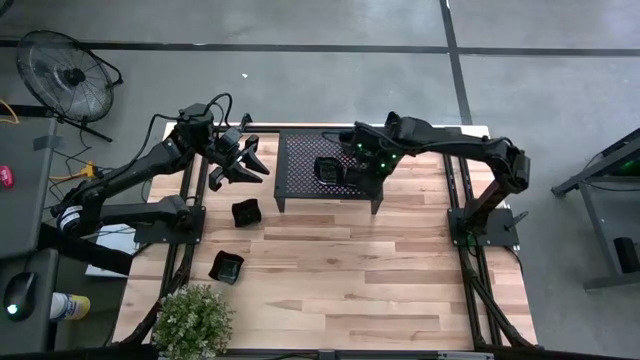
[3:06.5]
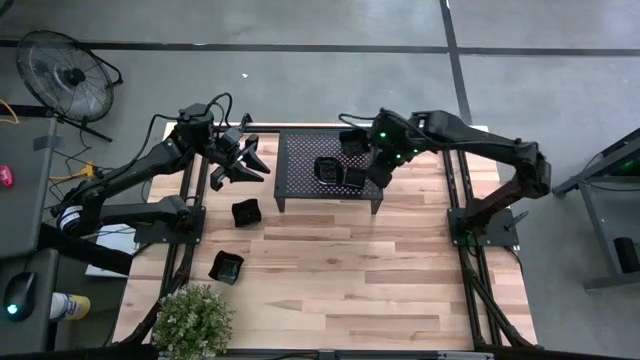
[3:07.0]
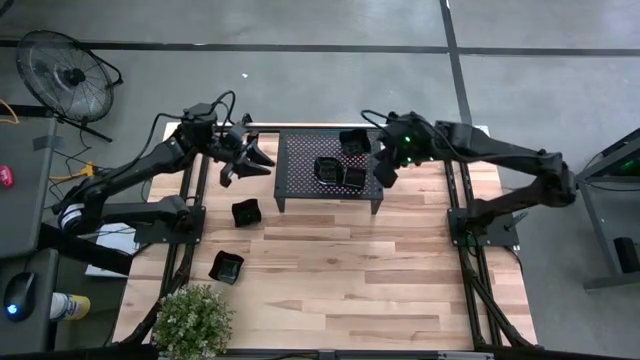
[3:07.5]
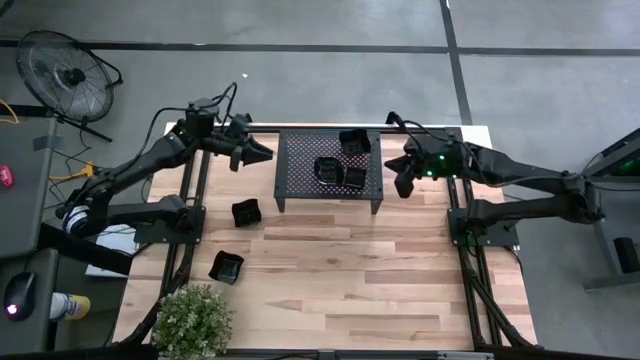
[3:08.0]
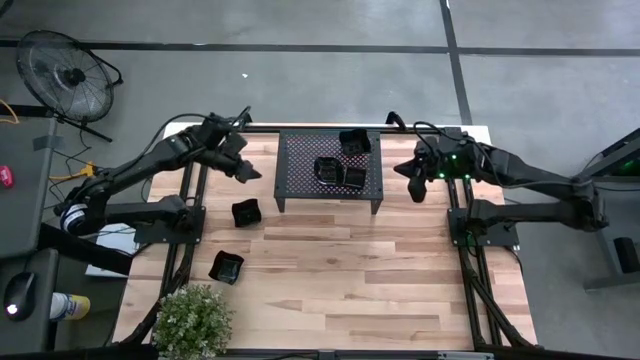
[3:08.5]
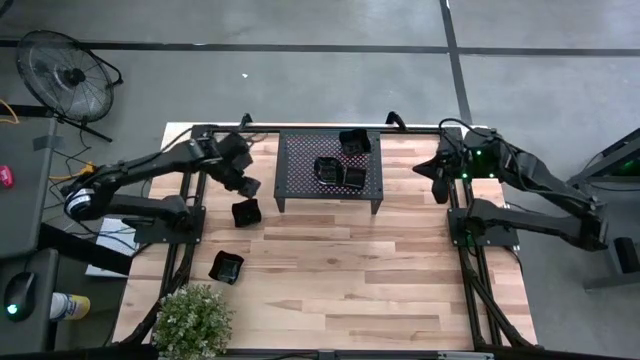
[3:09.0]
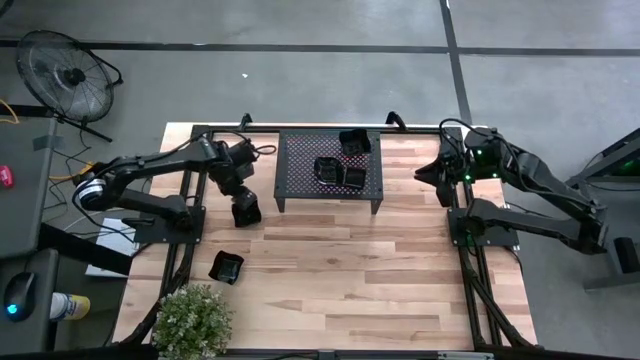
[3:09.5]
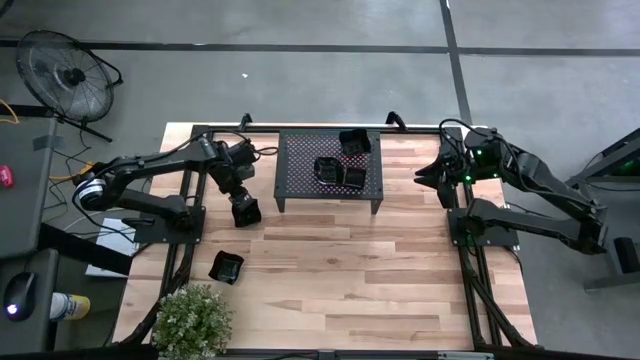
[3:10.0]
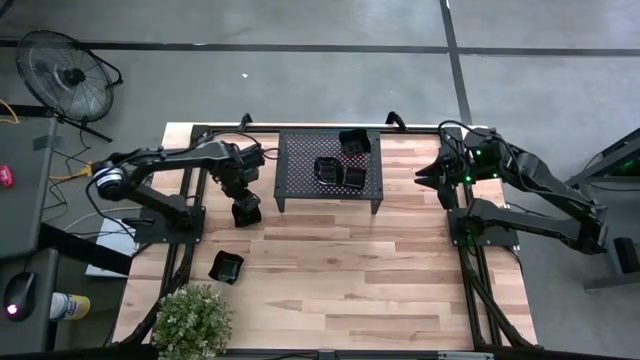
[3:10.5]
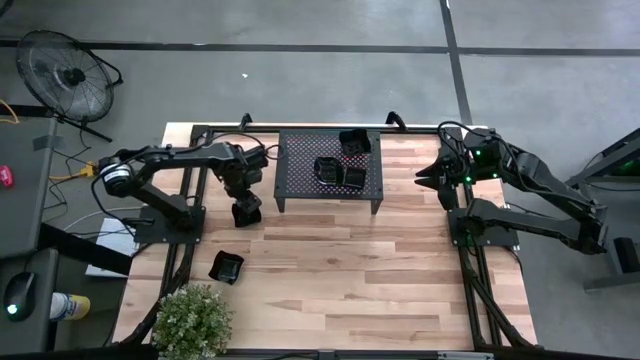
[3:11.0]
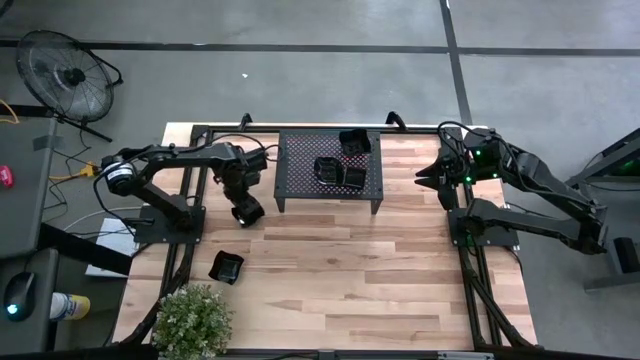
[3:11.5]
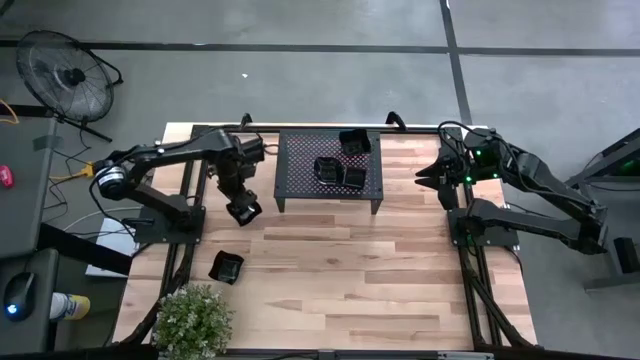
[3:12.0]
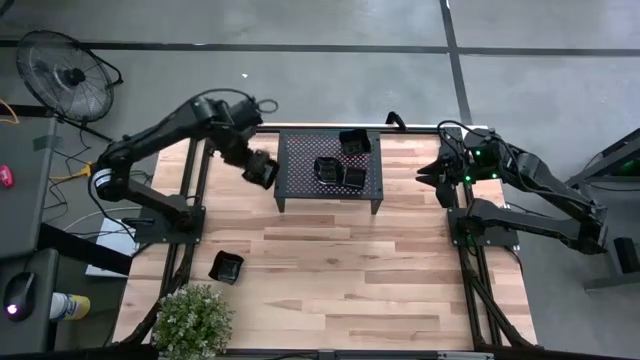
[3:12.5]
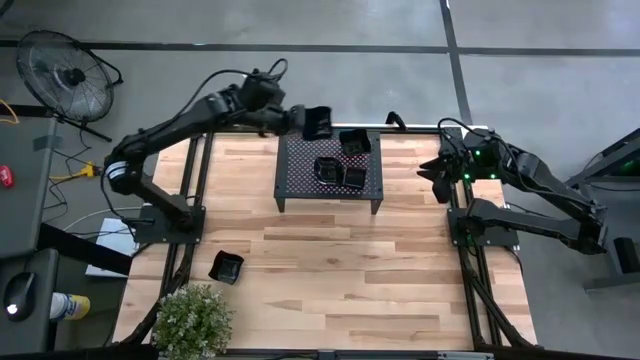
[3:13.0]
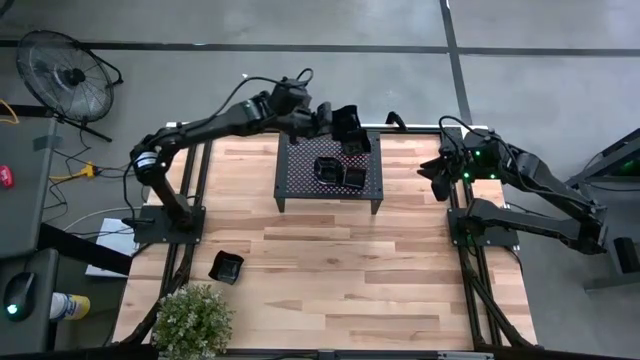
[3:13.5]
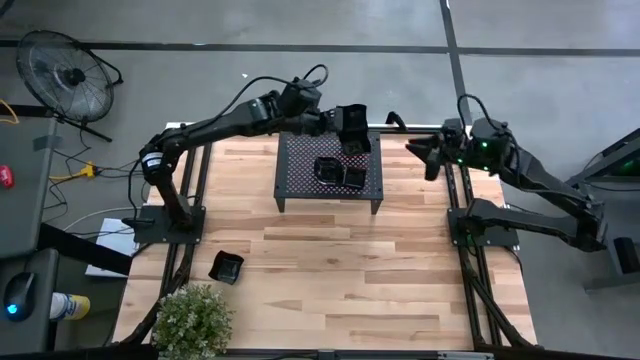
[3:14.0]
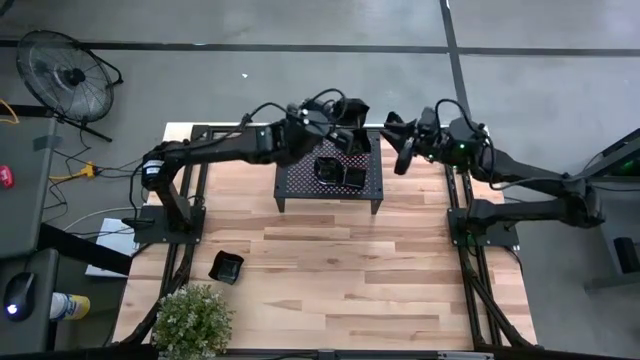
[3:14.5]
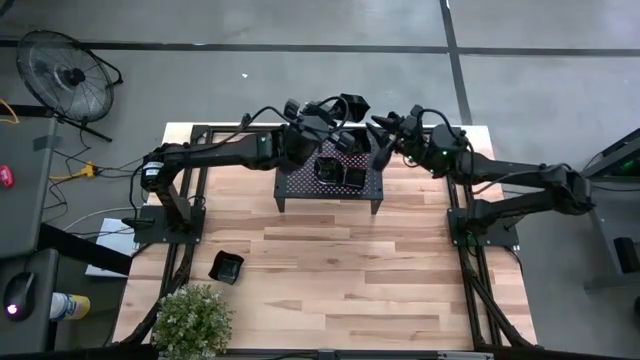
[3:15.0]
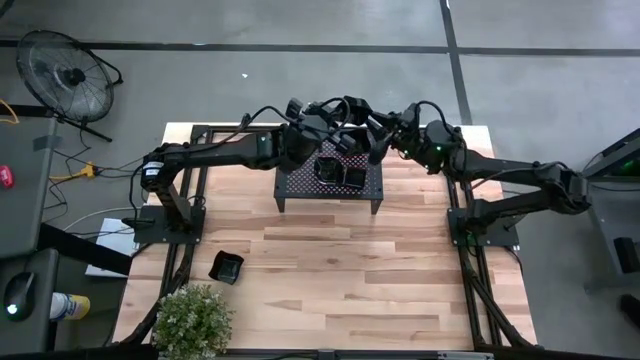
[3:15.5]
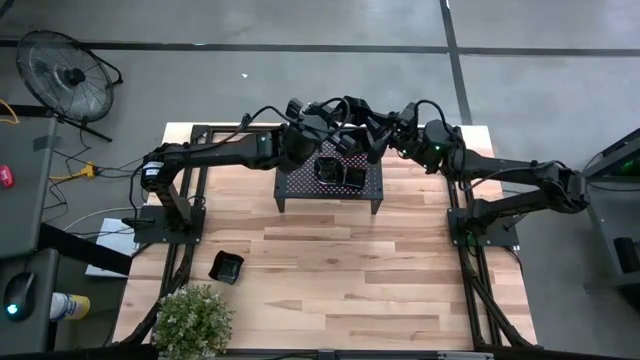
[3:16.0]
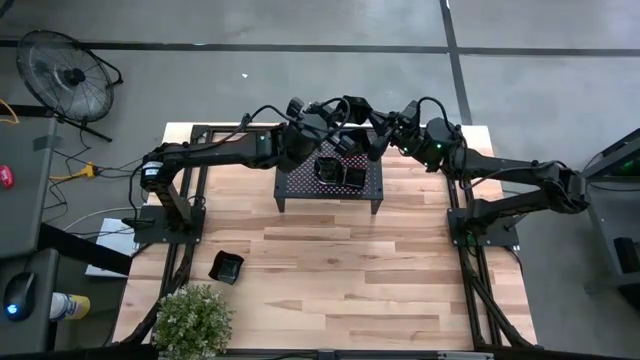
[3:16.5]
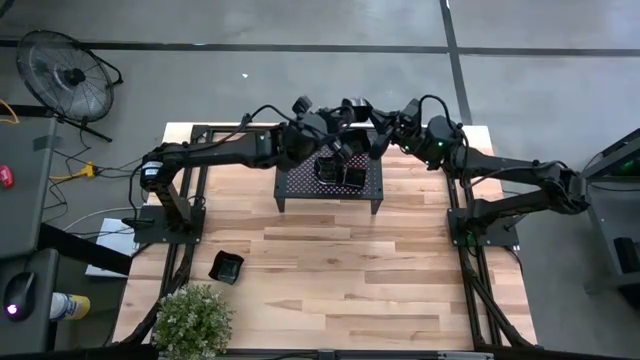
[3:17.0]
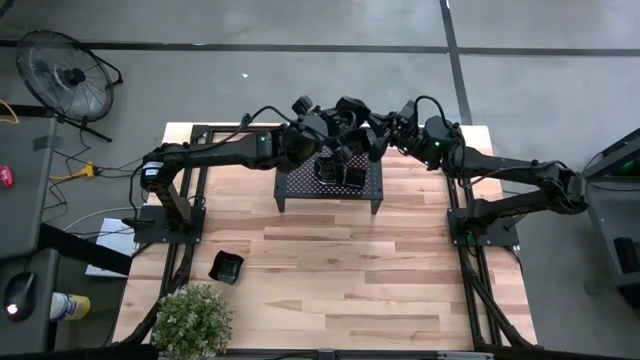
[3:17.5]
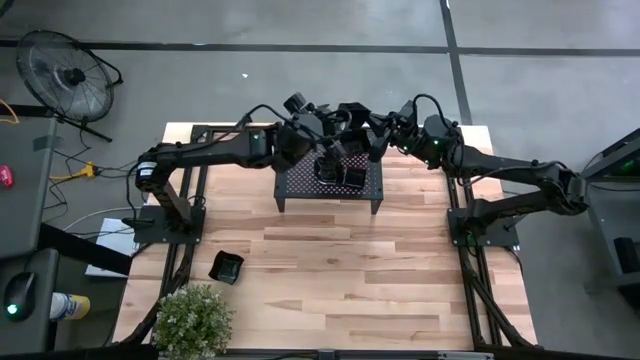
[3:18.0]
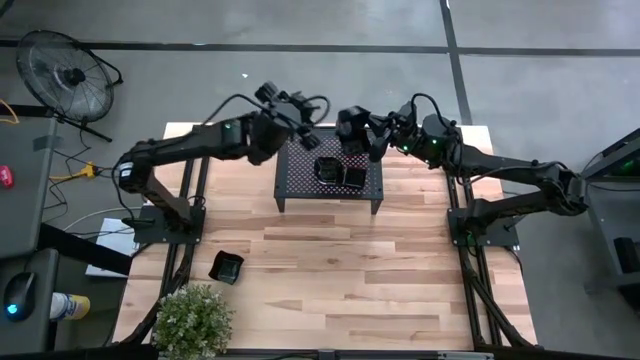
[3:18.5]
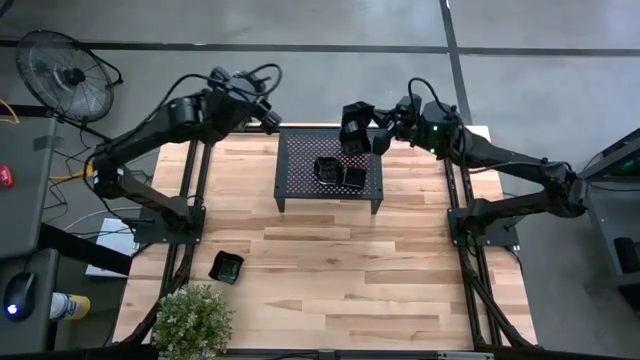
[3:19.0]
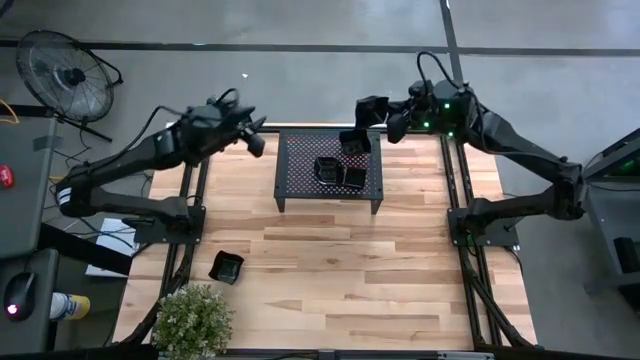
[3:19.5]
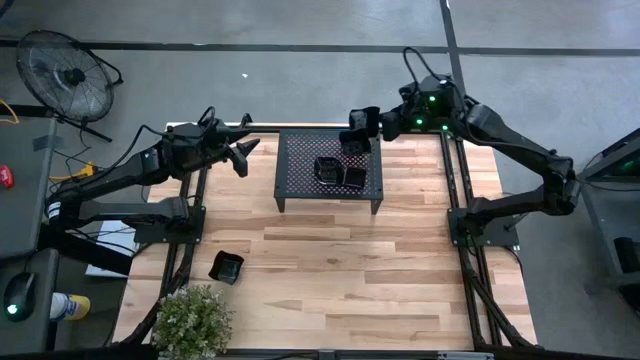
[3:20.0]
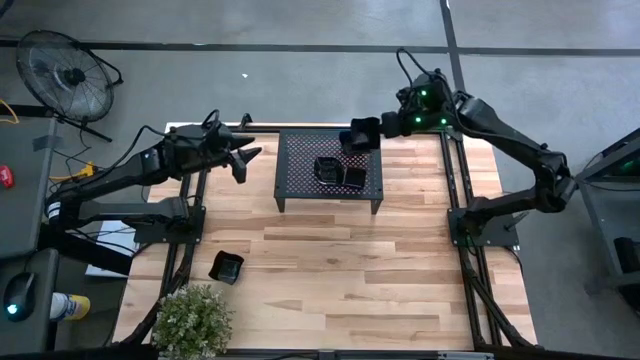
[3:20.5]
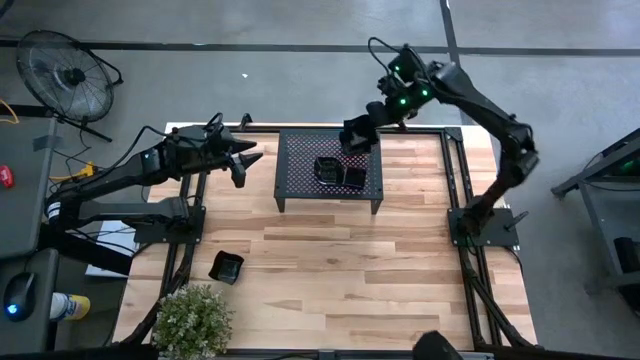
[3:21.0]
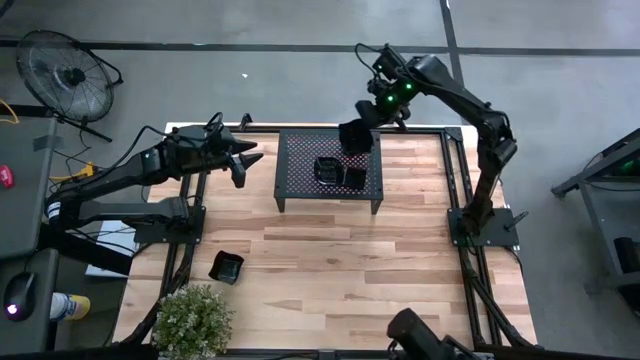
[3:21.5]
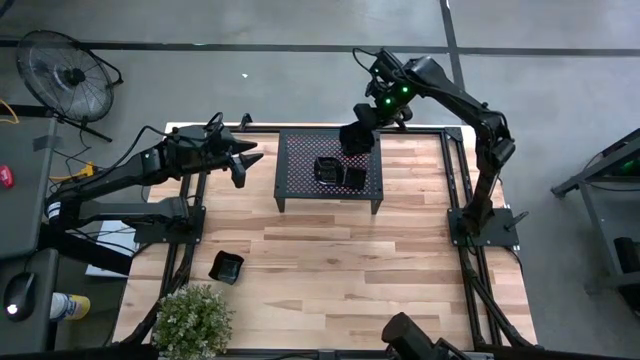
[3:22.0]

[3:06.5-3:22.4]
Task: Pick & Place Mini shaped plates
Stack the black distorted square plate on top of the other black distorted square plates on the shelf

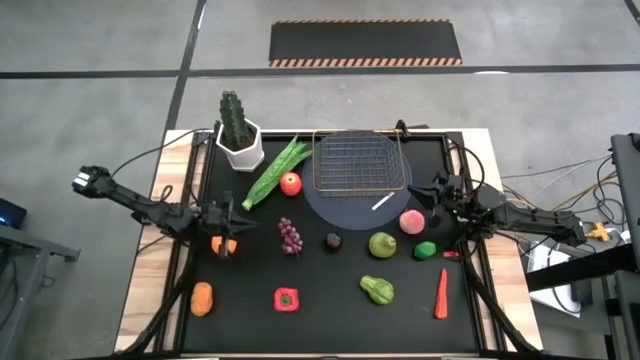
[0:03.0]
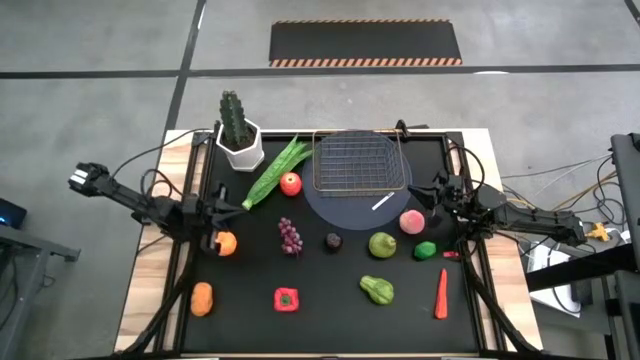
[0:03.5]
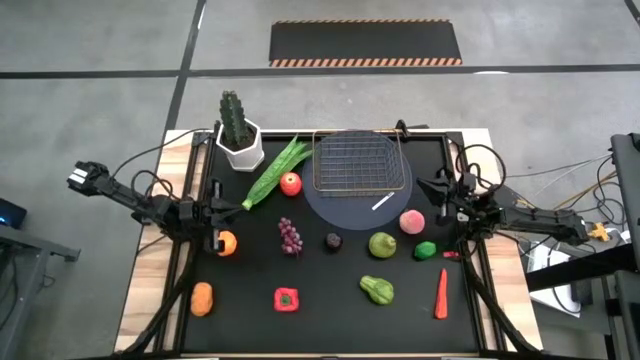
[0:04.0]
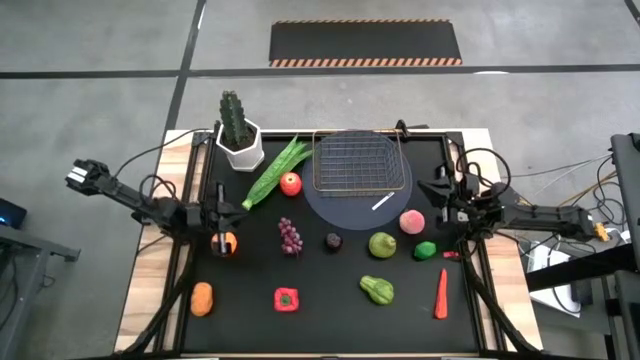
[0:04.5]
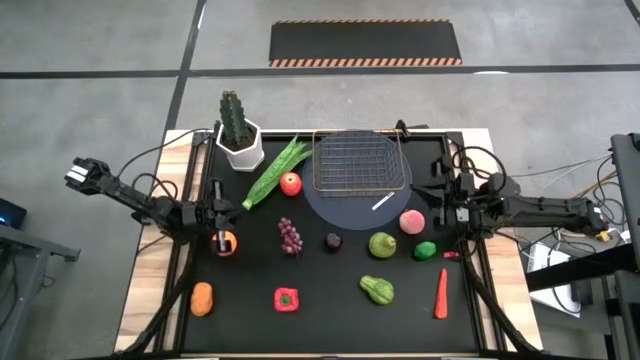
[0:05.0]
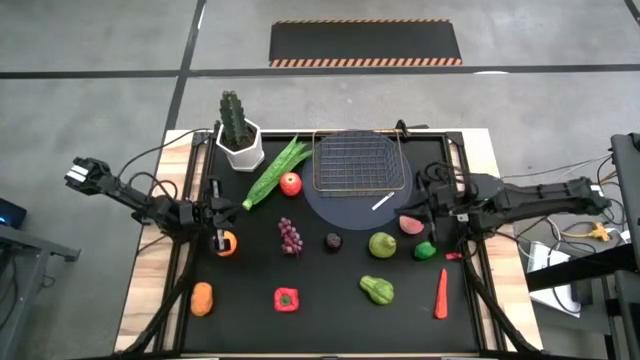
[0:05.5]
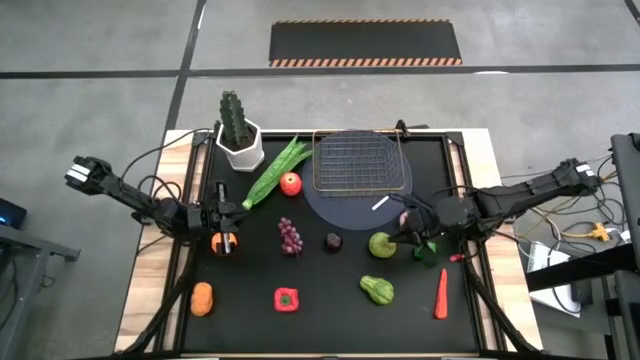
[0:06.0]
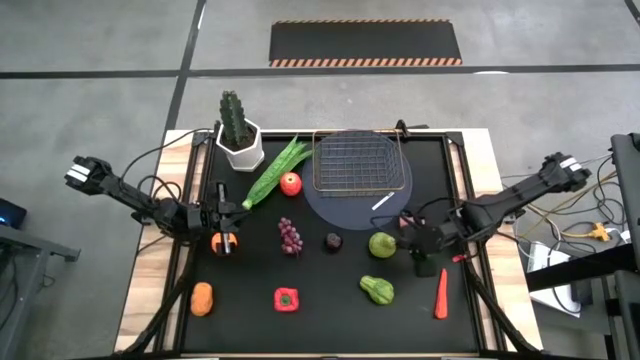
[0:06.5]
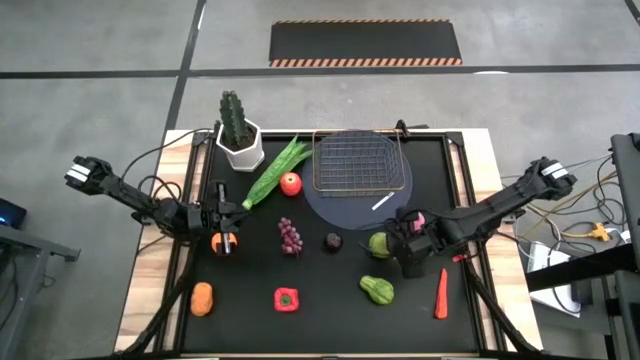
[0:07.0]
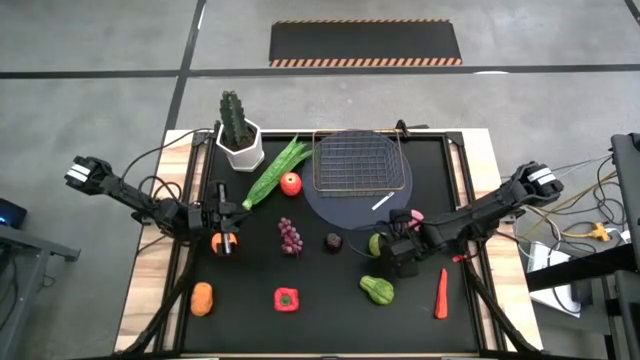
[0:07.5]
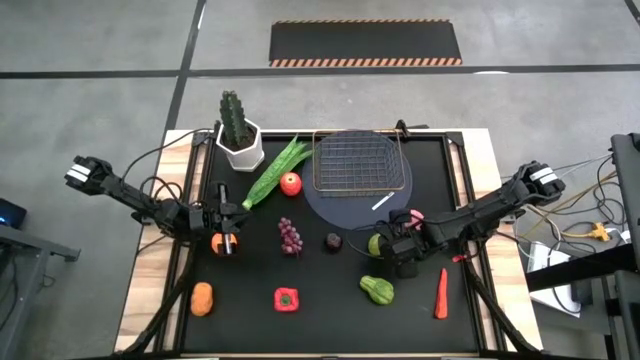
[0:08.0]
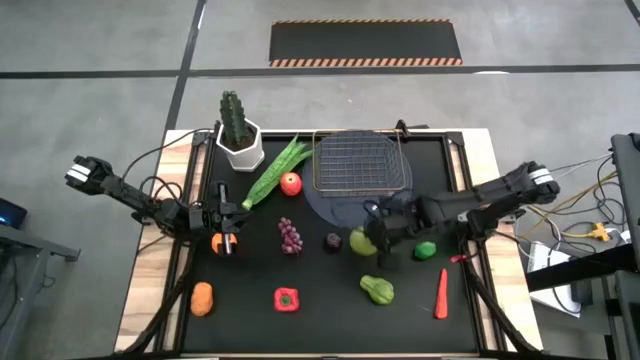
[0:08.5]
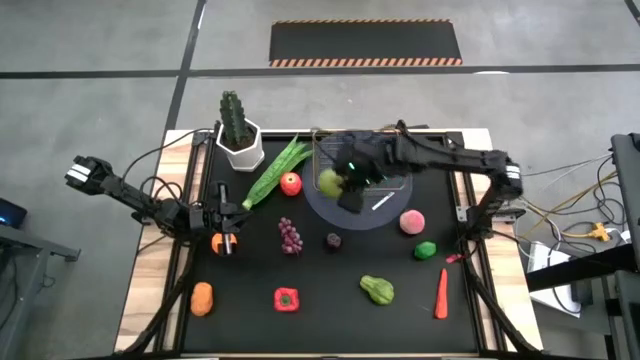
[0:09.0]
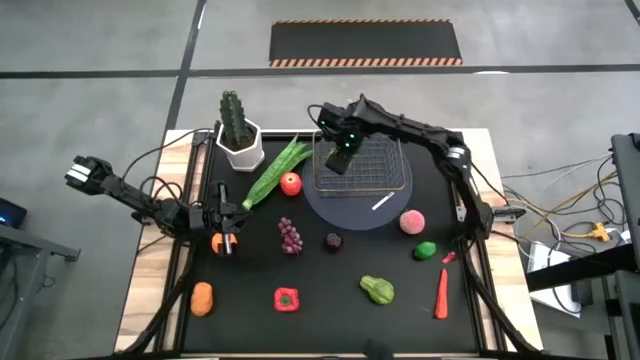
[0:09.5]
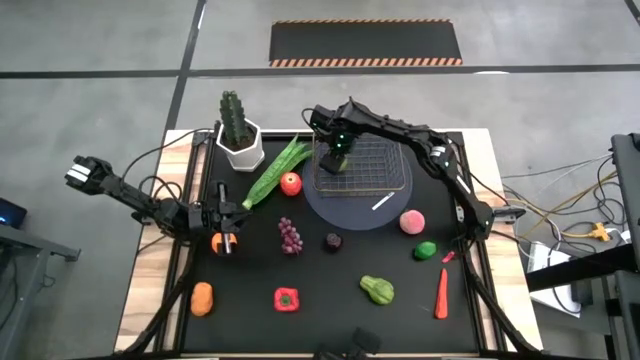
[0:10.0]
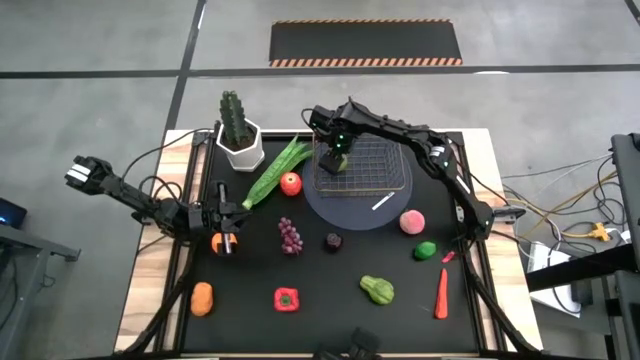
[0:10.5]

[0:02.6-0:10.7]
Task: Build produce basket
Put the green pear into the gold wire basket
